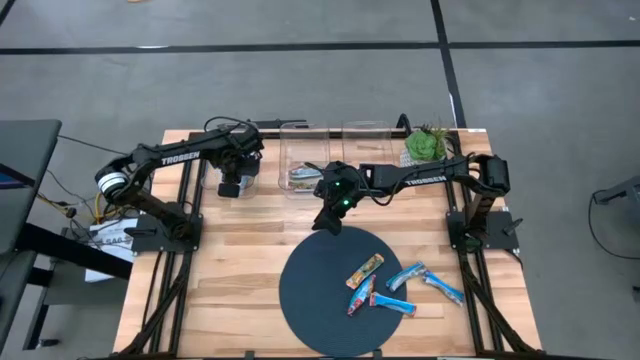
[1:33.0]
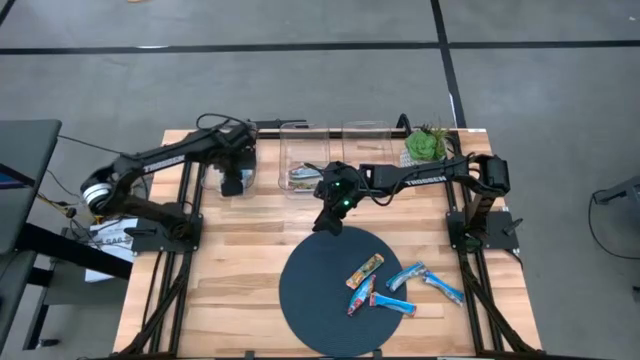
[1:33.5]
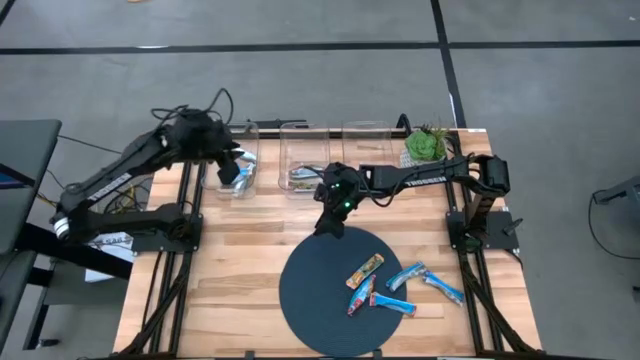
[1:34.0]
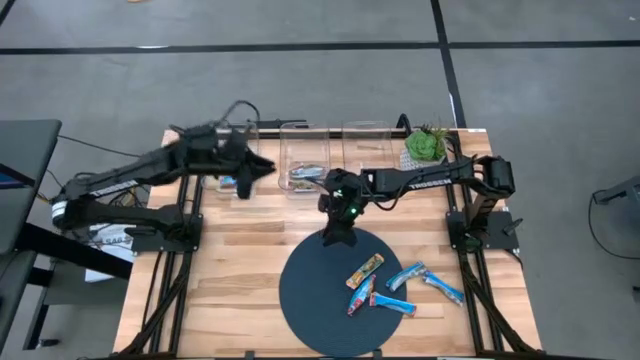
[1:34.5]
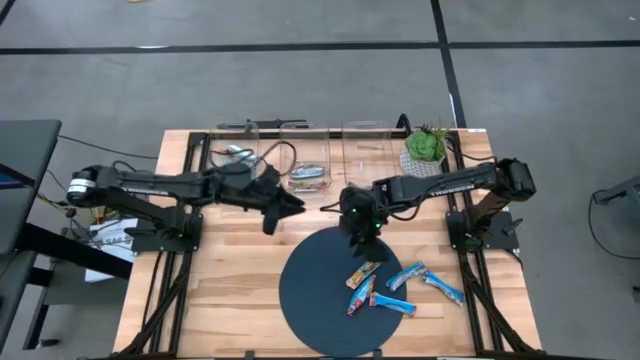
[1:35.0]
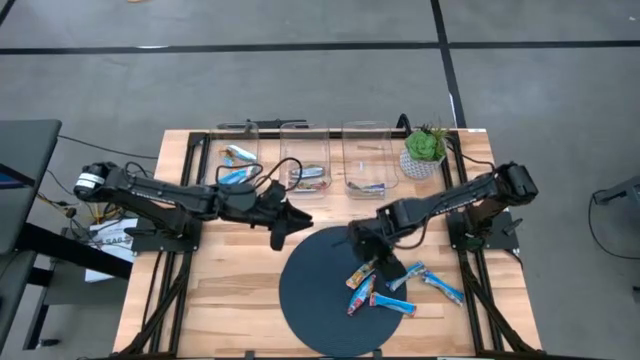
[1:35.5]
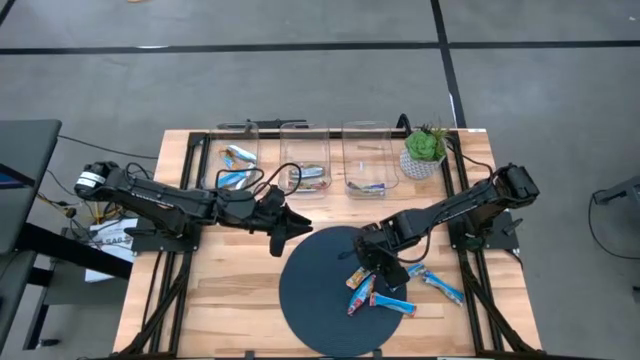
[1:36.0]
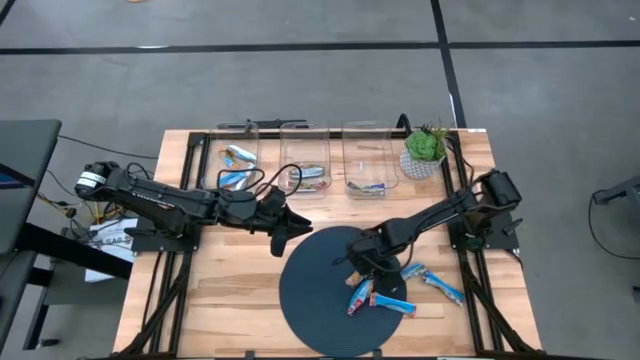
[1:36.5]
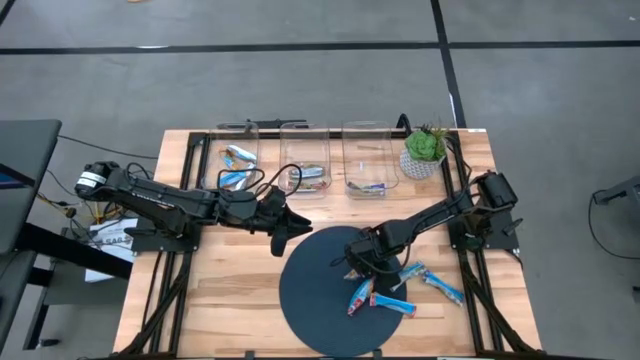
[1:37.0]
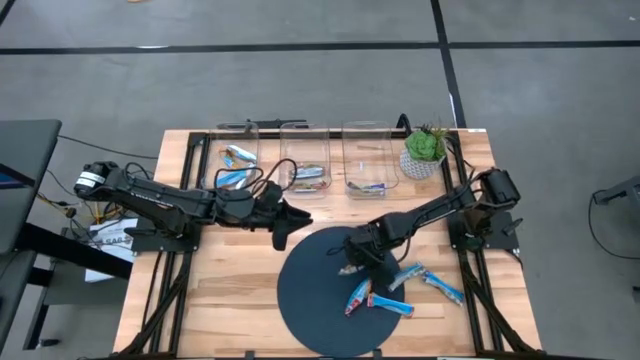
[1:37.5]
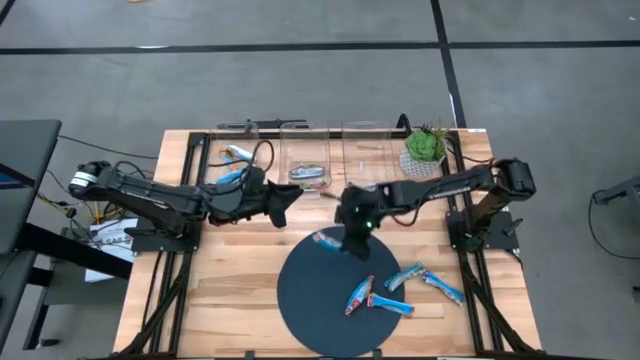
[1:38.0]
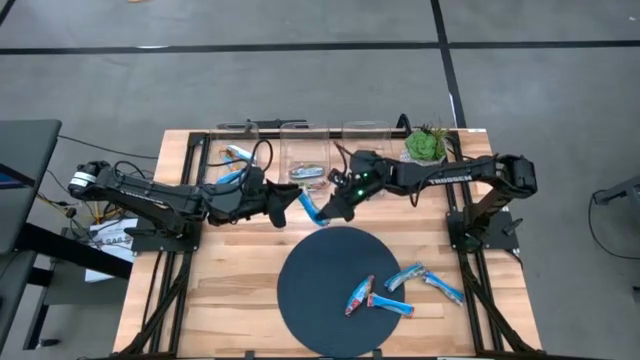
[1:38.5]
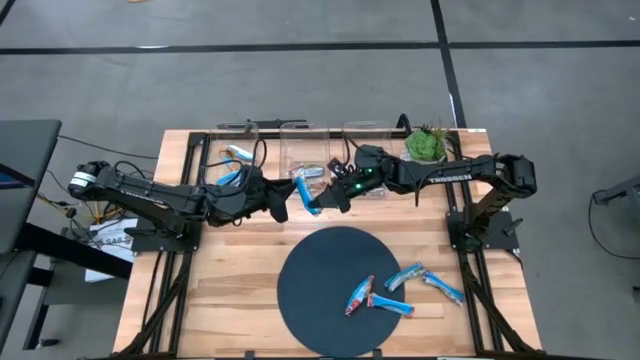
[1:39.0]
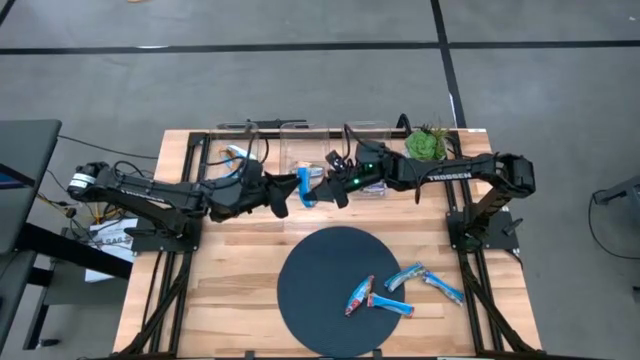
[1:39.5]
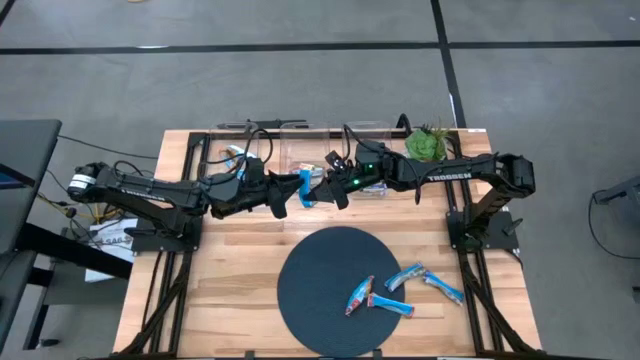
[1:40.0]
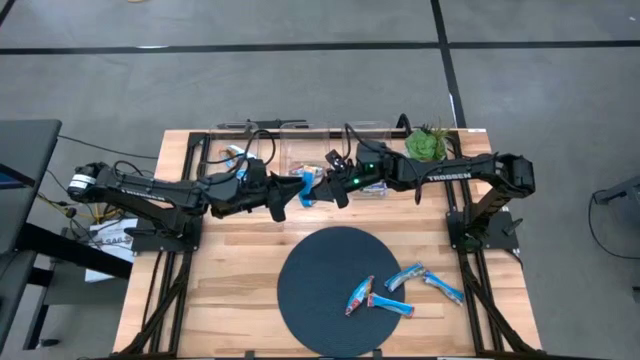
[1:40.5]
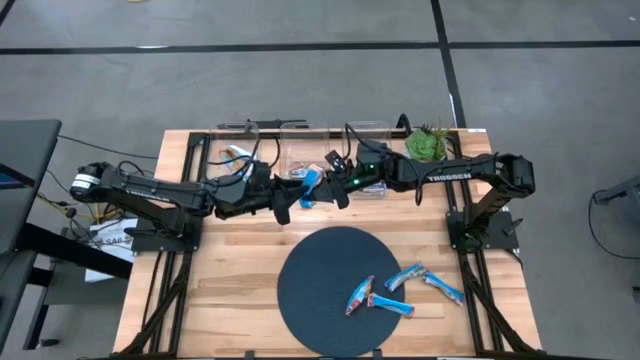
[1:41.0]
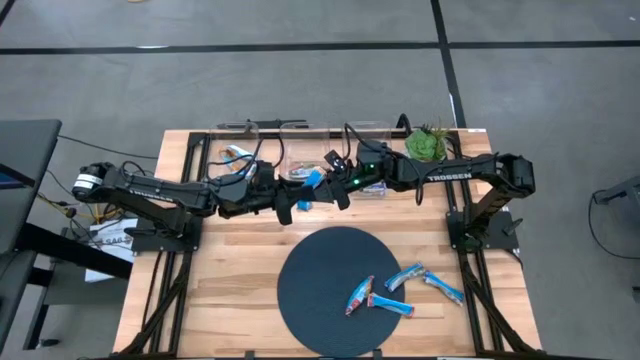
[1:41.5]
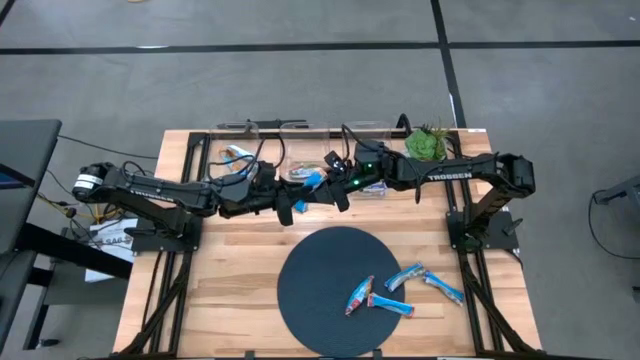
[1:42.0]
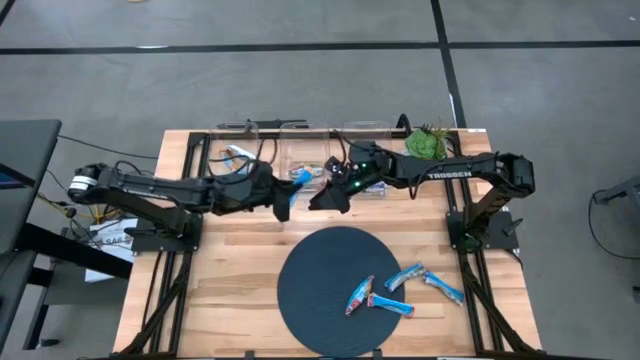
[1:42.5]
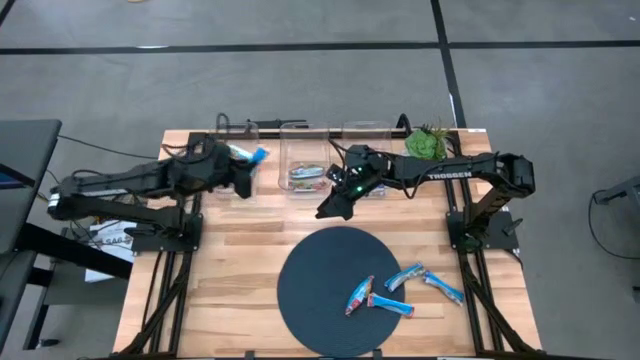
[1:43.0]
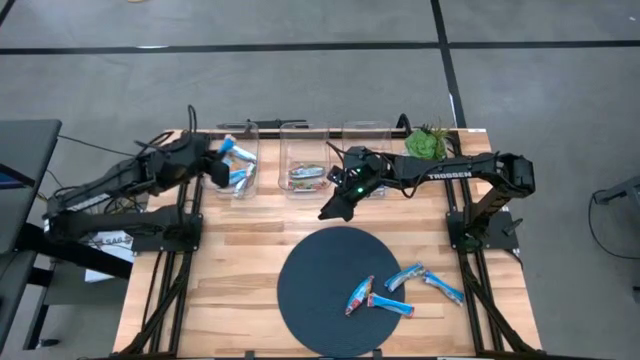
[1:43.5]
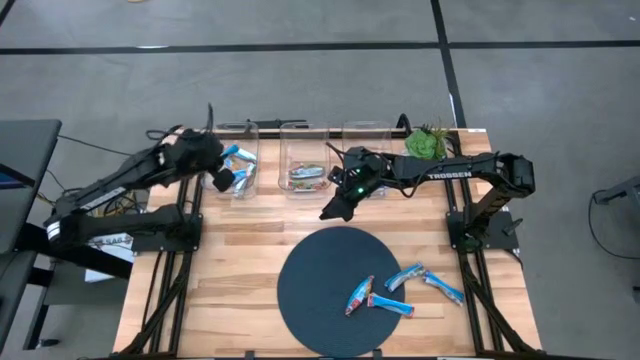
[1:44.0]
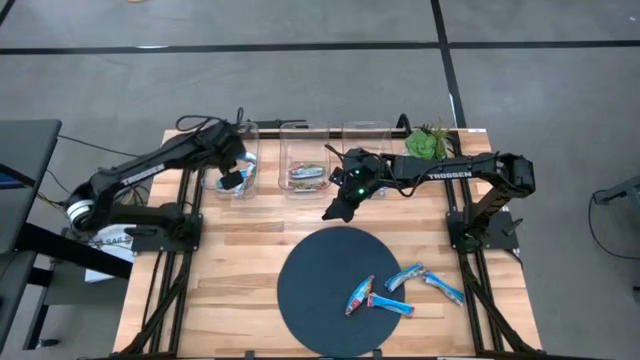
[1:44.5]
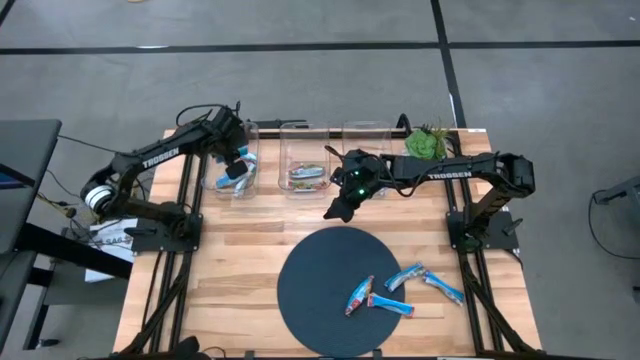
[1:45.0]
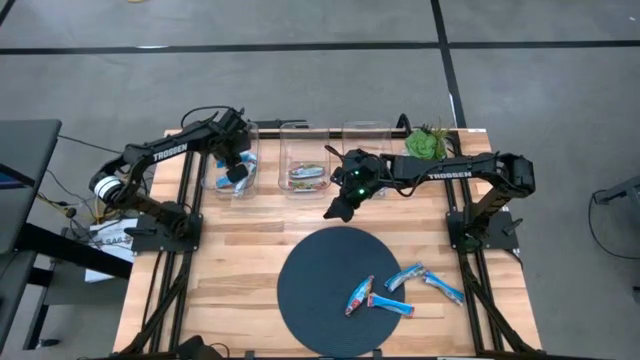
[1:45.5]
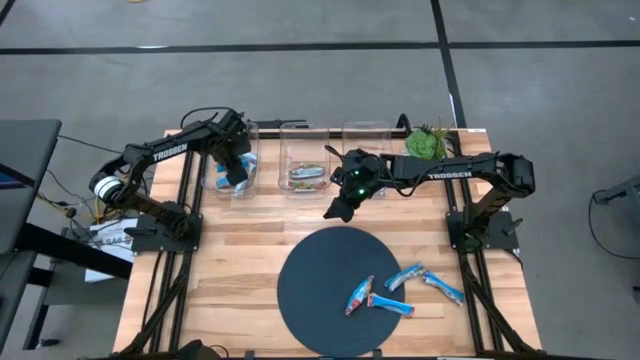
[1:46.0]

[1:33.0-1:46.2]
Task: Pick and place Granola Bars by type
Put the yellow granola bar into the left transparent bin
